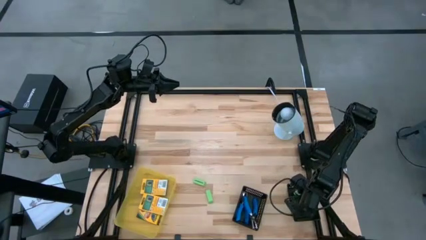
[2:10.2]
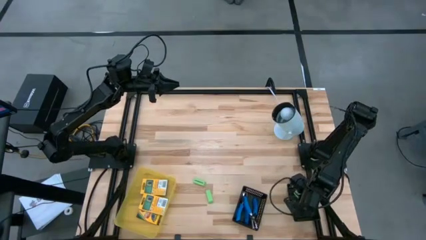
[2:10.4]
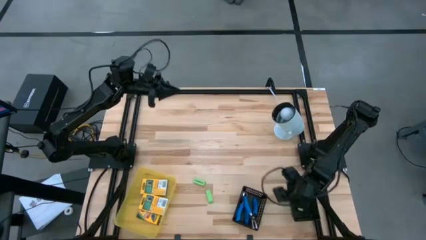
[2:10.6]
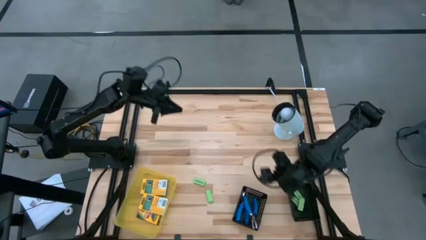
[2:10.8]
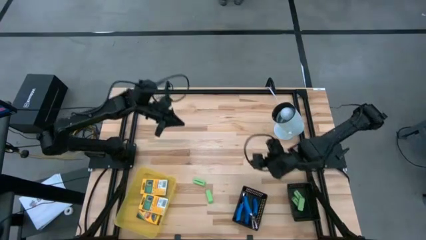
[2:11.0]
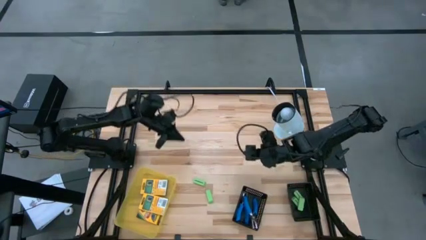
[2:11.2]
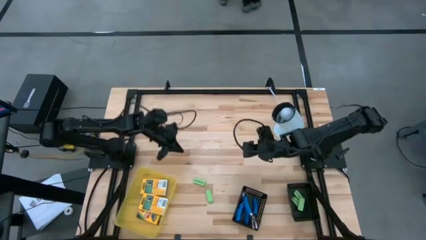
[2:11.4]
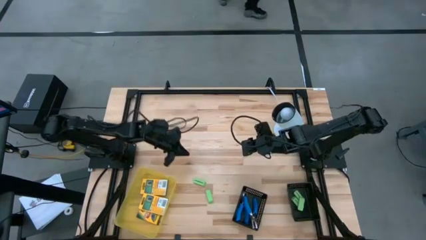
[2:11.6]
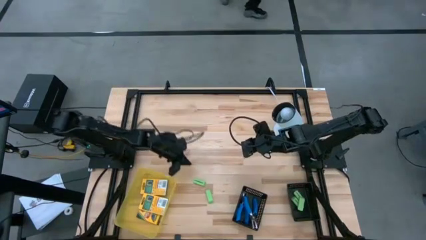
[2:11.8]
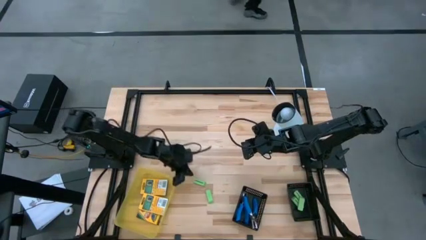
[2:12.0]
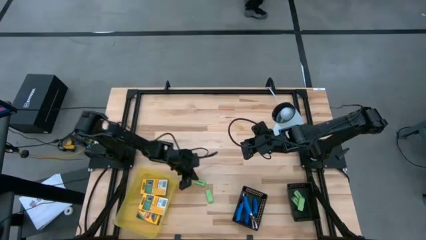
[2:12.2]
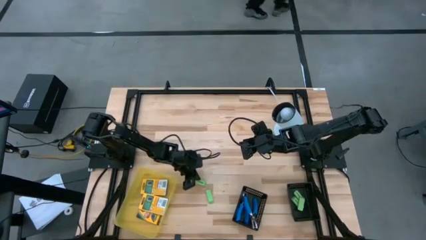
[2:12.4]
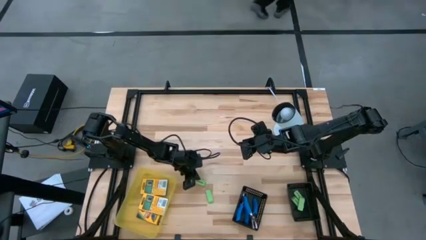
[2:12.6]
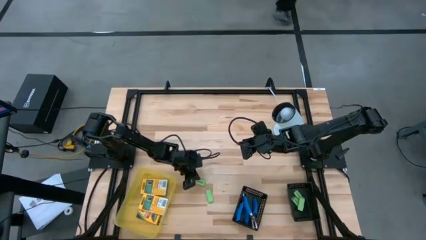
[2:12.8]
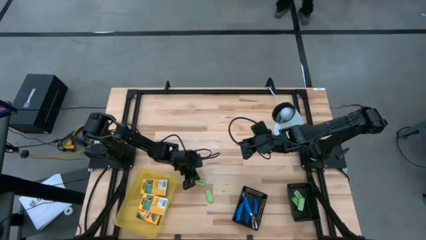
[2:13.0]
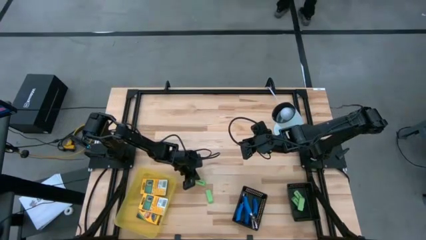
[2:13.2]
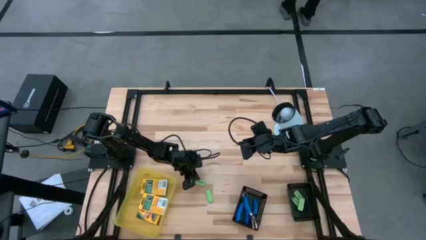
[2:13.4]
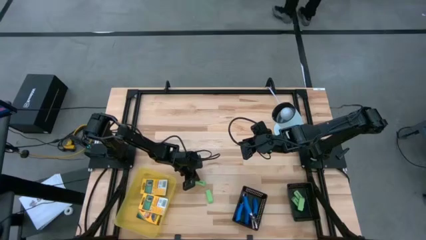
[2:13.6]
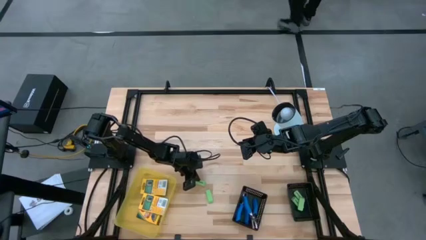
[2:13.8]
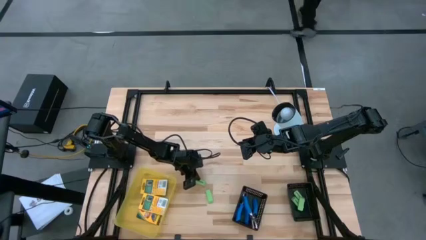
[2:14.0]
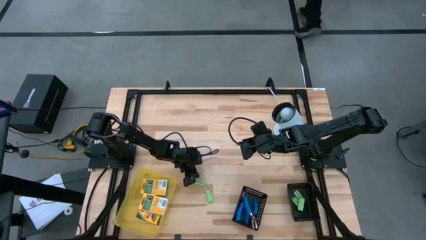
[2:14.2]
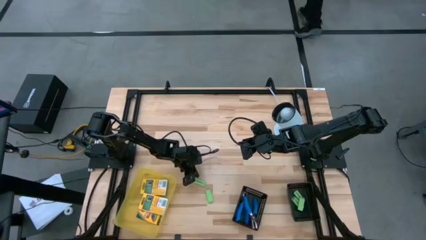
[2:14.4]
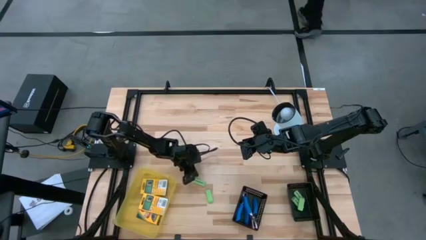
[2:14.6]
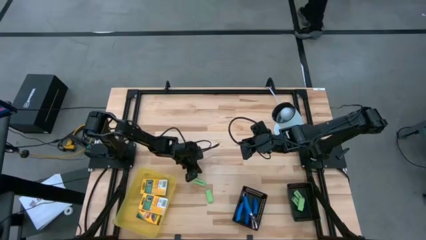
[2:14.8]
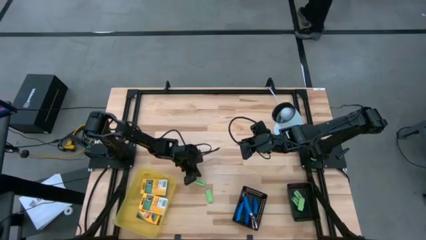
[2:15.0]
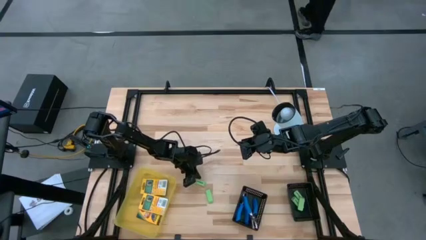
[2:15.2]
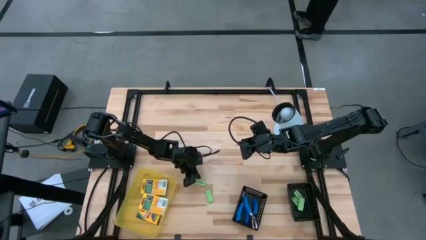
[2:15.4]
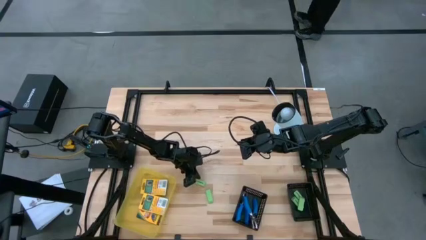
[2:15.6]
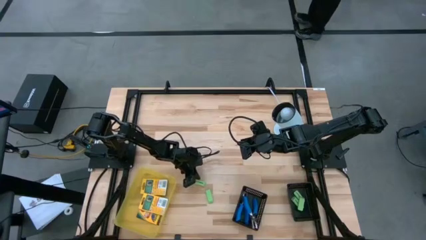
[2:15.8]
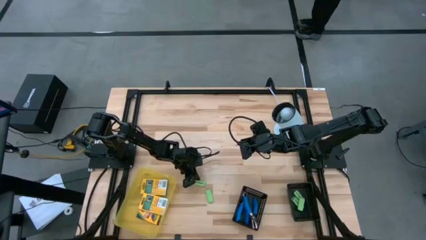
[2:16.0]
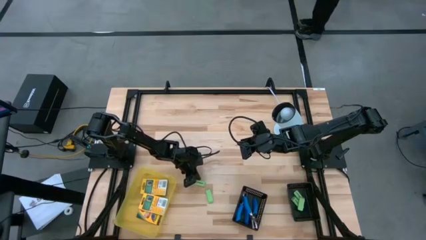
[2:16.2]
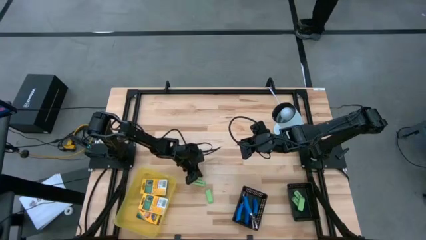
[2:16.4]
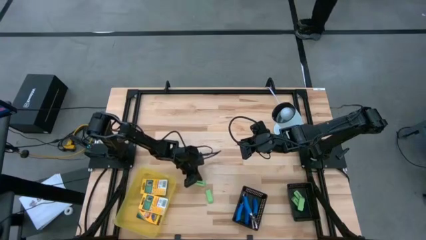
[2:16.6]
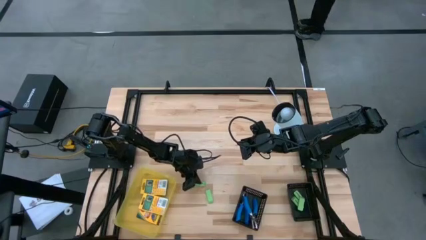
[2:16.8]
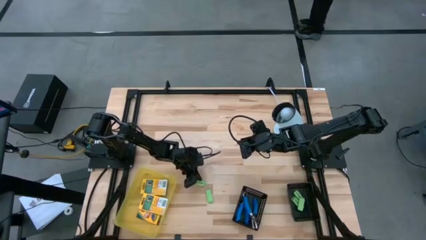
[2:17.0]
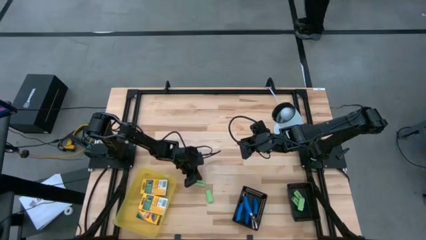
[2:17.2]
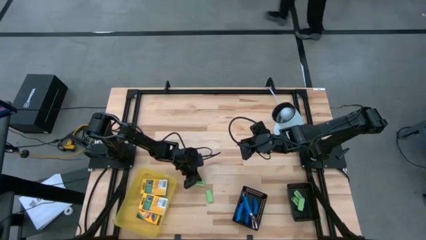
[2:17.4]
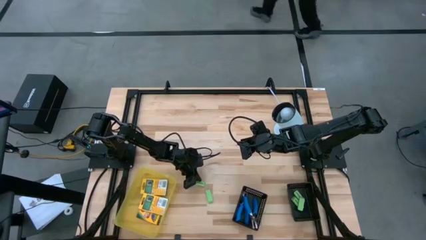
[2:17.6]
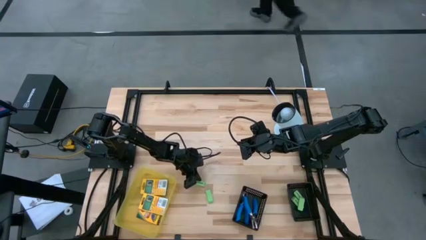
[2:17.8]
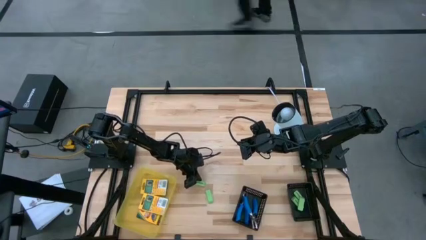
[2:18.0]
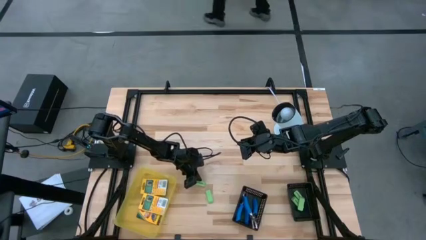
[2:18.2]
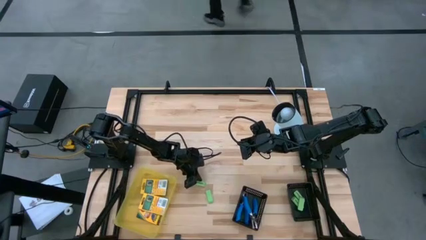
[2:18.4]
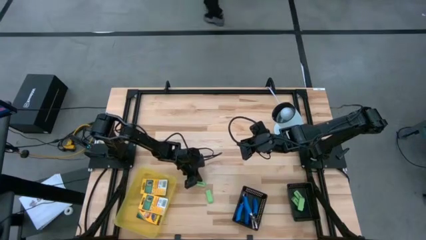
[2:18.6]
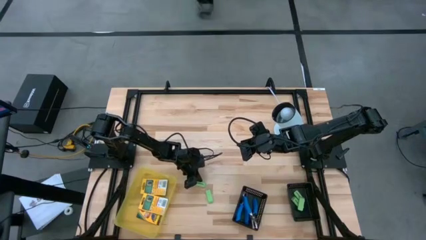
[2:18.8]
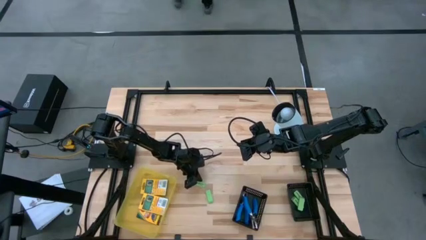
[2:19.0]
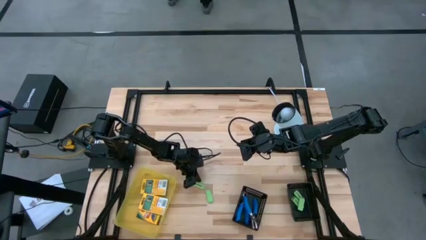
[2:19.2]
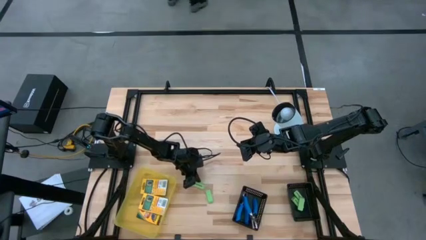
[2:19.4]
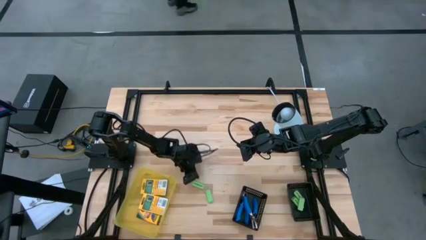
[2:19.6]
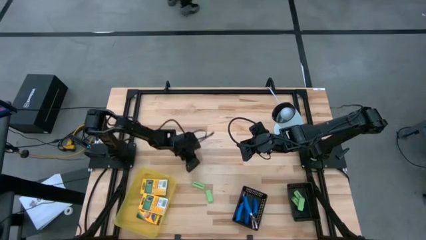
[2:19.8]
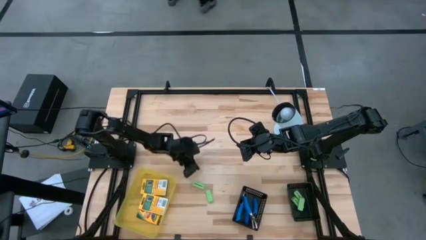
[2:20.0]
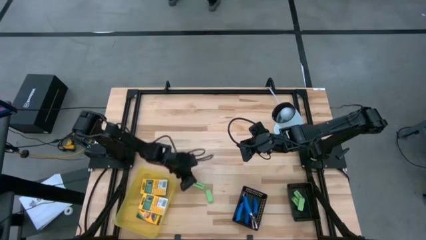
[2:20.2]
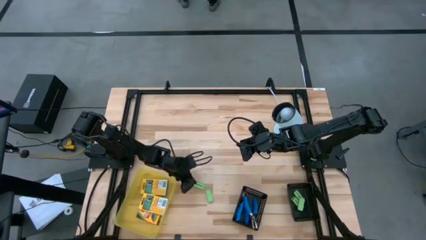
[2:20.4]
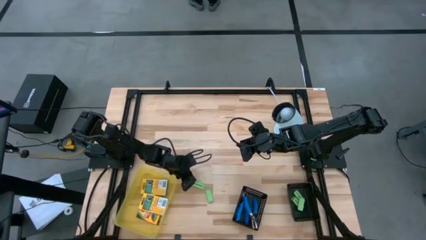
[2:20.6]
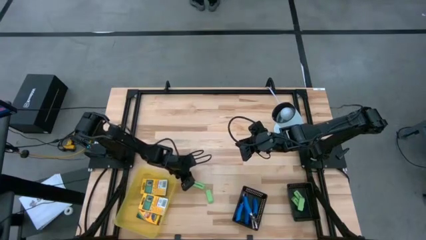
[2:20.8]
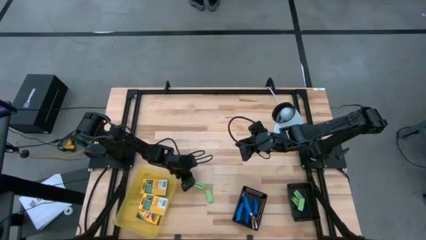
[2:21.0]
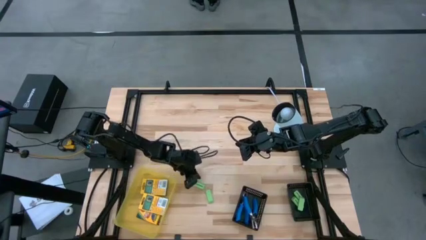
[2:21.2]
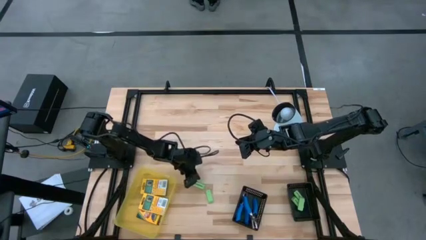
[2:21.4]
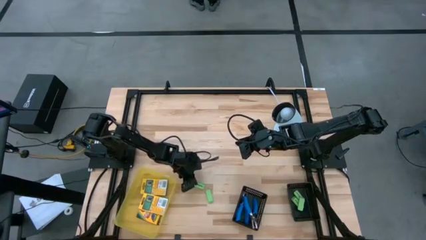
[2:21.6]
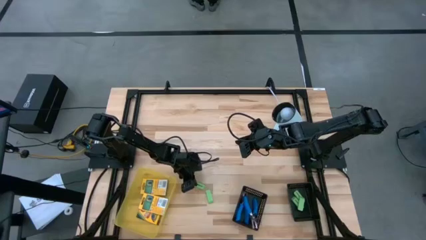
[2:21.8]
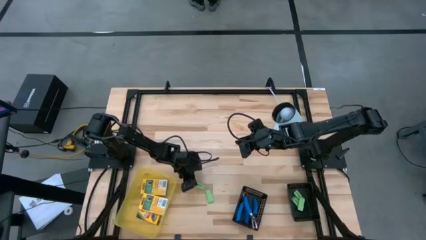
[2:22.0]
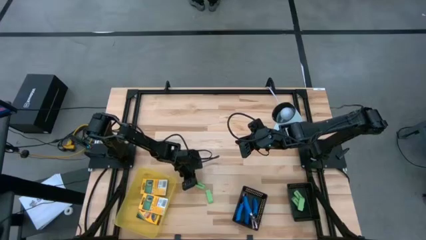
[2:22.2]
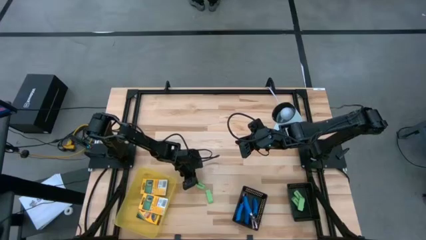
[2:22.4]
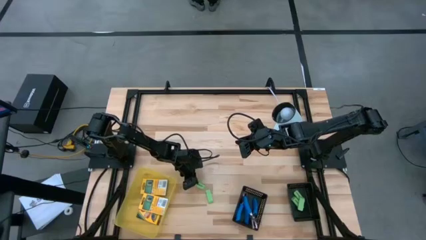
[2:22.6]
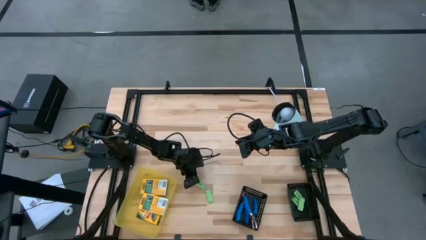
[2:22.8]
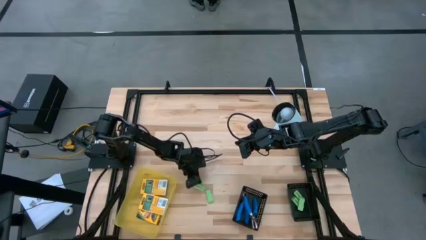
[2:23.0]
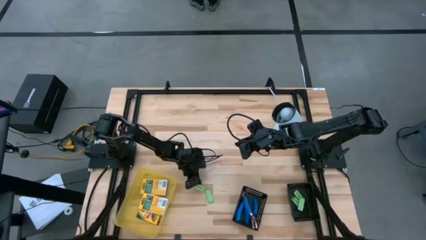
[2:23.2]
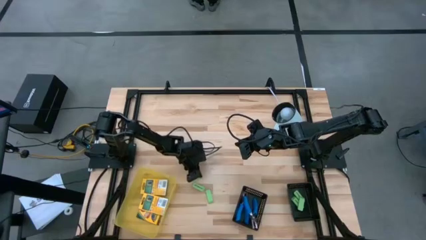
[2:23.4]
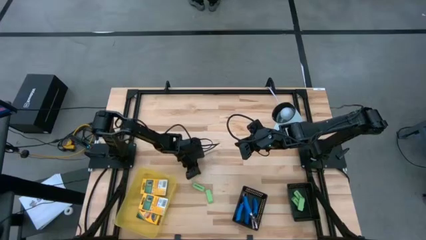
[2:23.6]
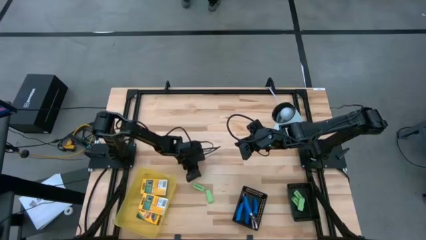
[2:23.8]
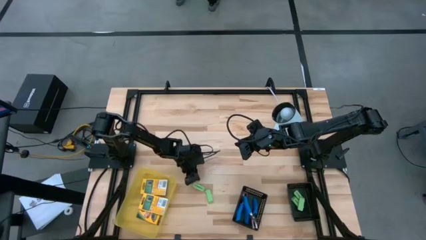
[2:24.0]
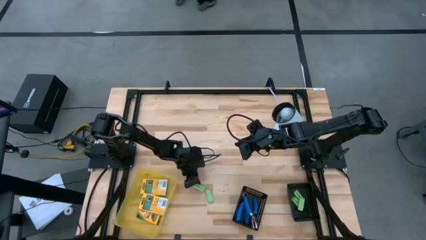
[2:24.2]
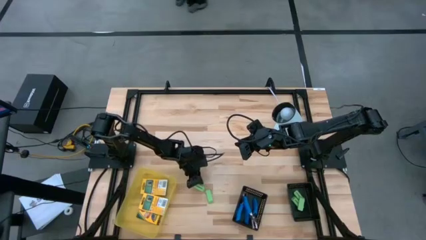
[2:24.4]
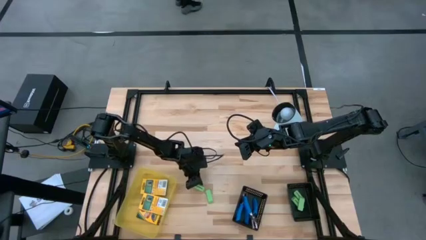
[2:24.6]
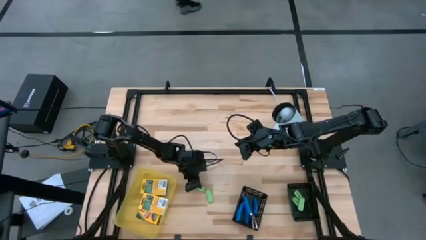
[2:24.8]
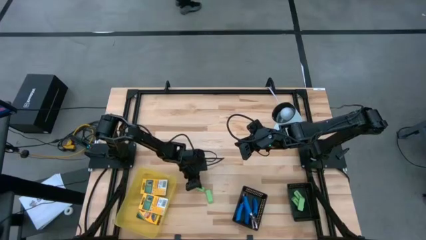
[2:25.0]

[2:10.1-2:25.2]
Task: Pick & Place School Supplies
Put the green eraser into the right black bin

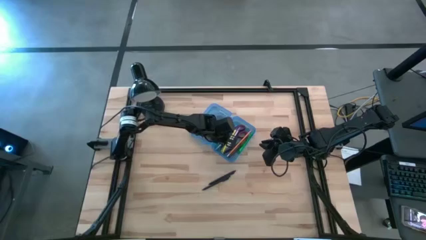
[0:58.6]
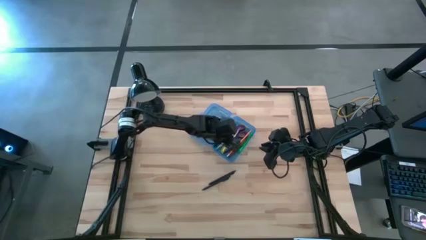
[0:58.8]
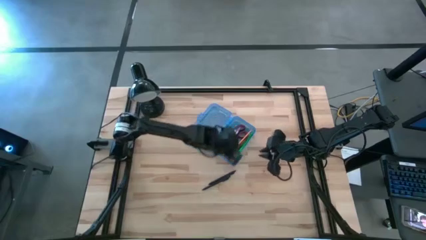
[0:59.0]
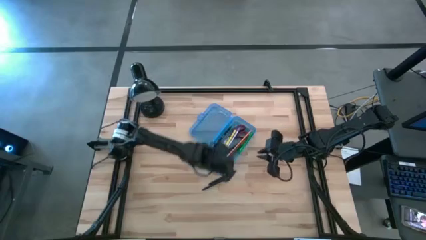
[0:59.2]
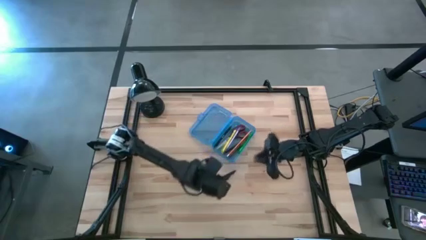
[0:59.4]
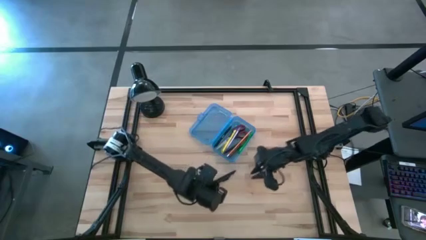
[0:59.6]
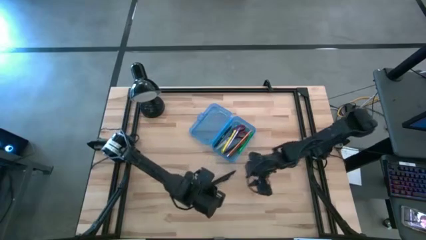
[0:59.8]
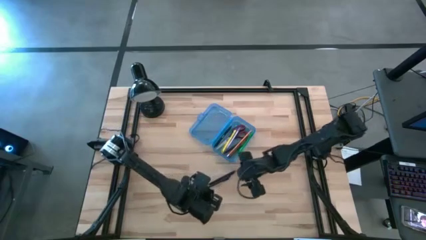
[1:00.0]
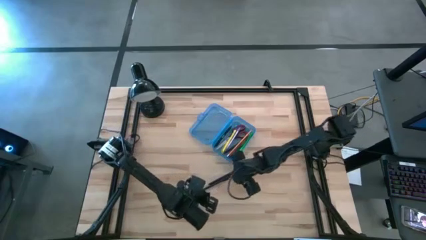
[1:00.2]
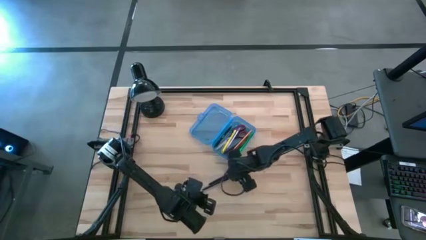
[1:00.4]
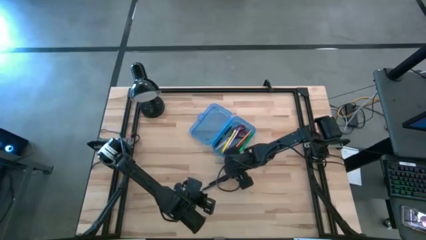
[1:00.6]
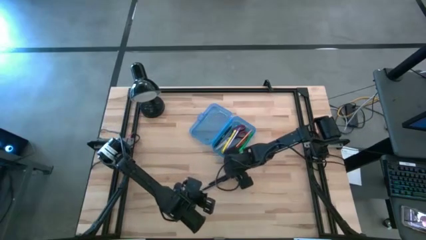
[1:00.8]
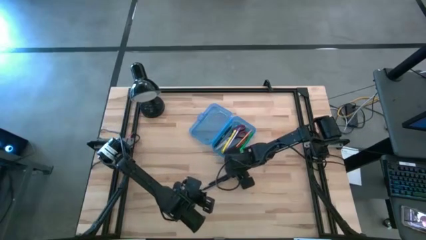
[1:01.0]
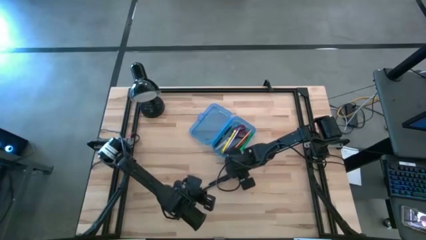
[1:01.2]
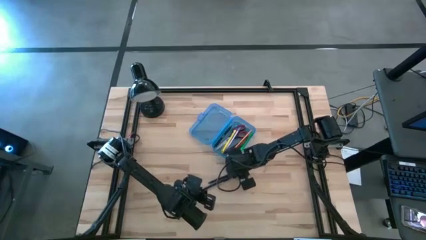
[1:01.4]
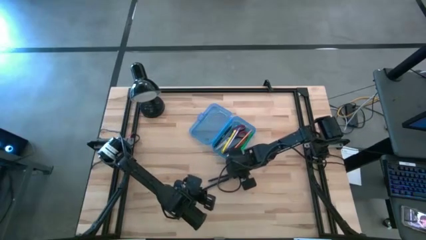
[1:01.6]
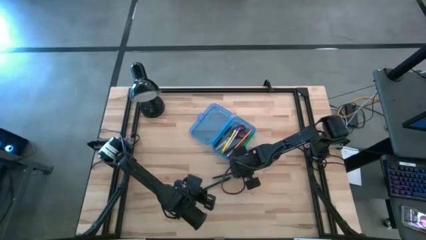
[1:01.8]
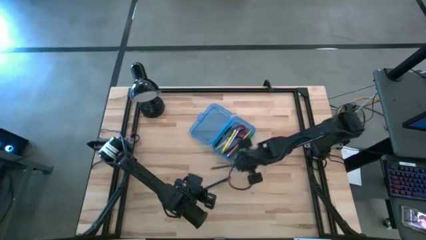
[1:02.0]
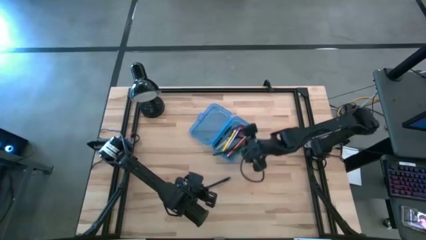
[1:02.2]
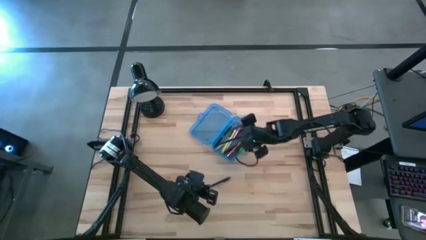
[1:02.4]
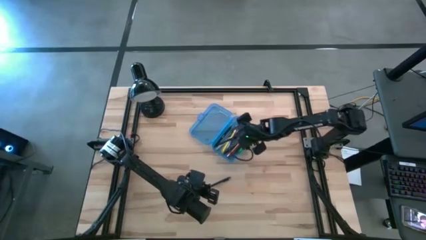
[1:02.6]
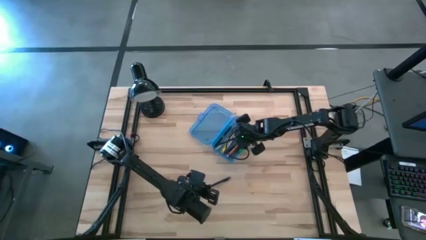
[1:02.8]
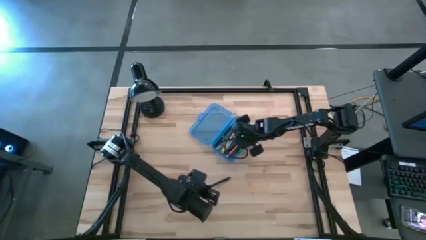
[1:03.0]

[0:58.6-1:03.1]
Task: Pick & place school supplies into a supply box
Put the top black pen into the supply box
